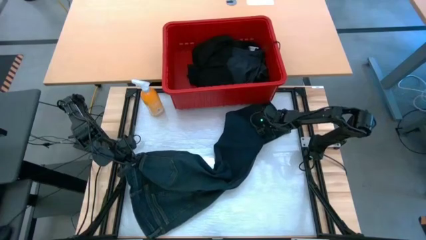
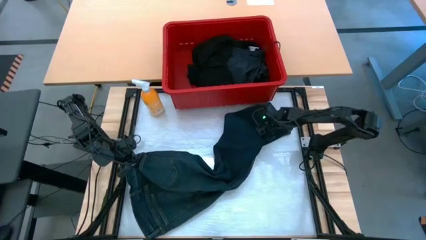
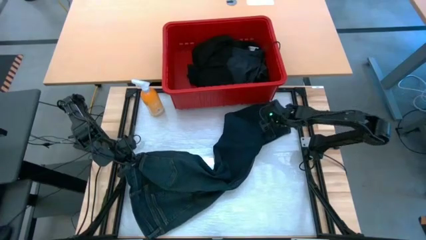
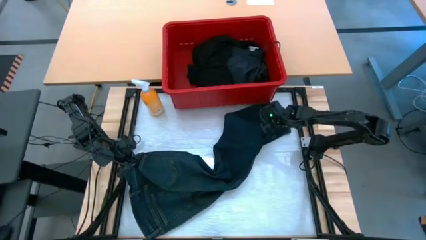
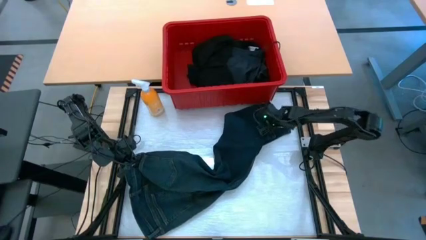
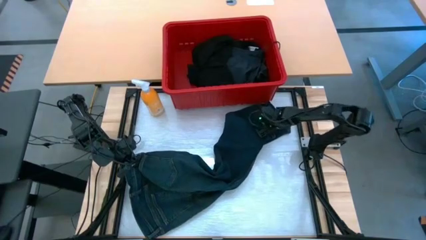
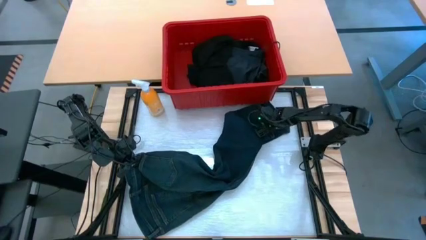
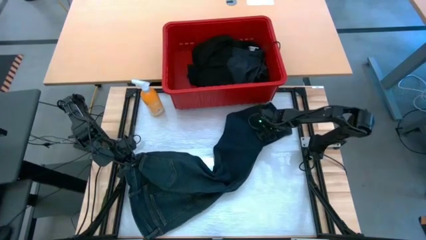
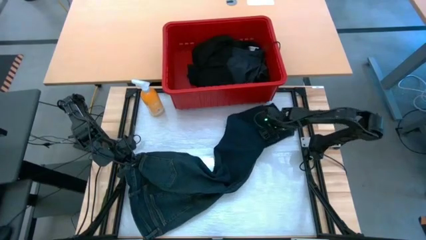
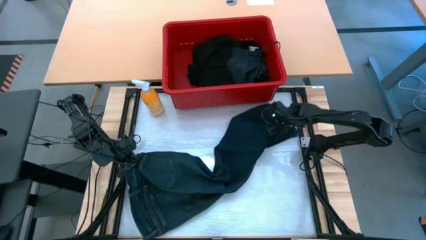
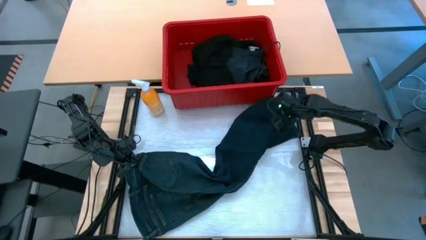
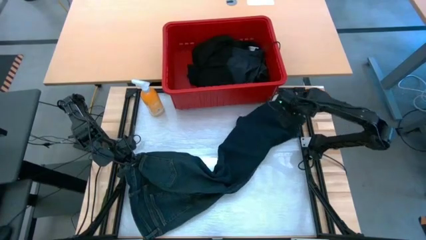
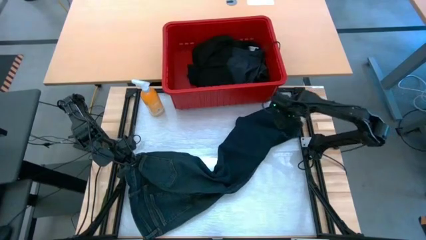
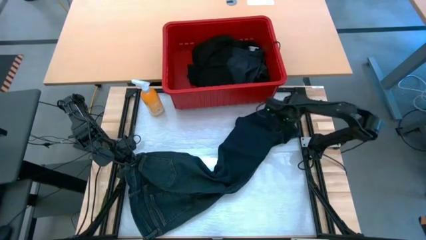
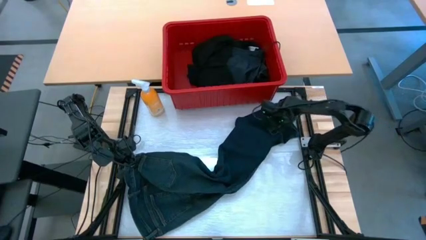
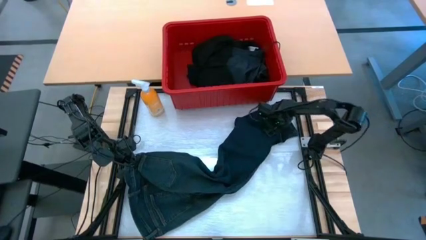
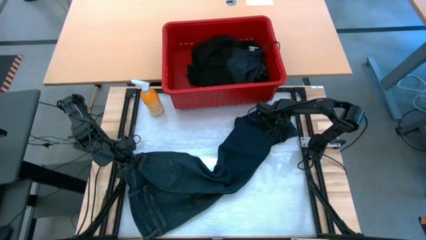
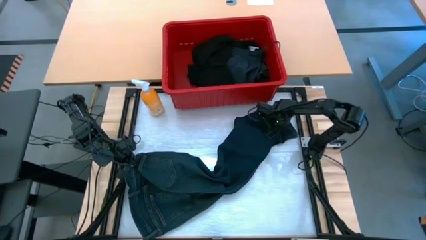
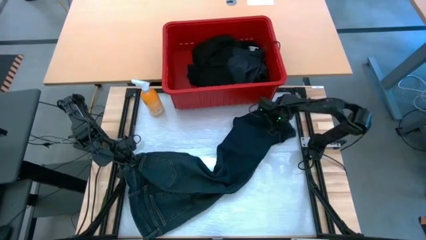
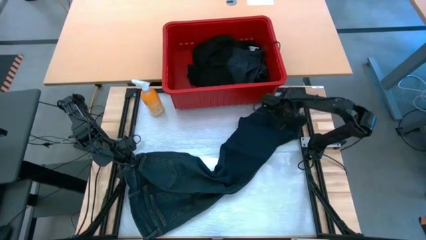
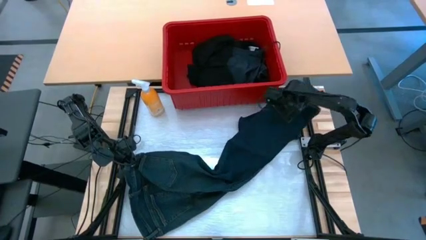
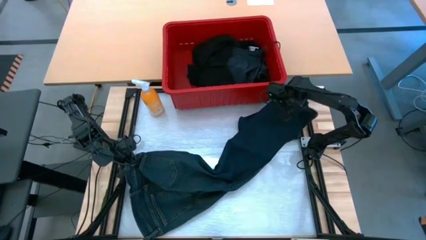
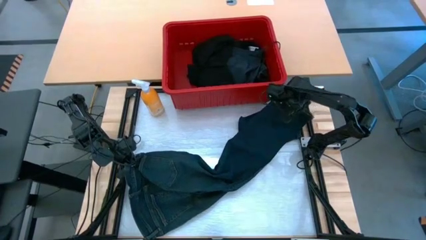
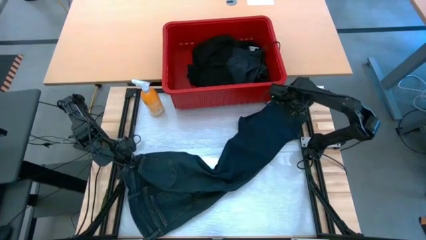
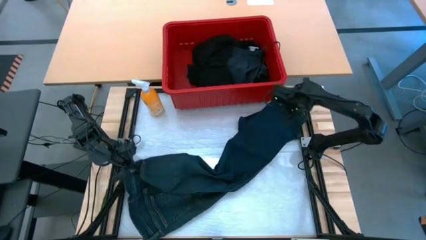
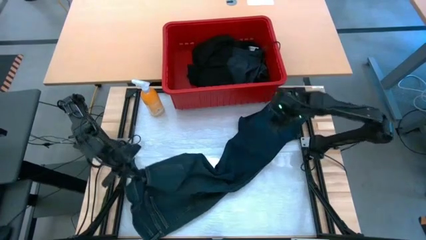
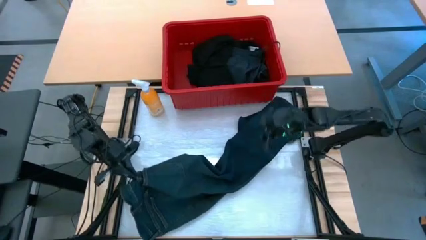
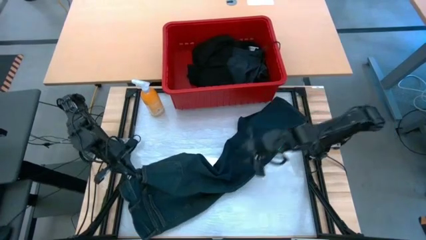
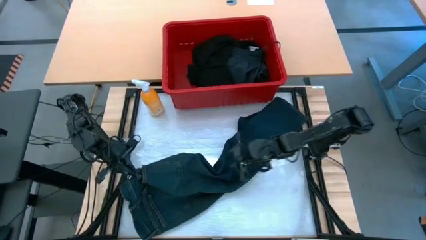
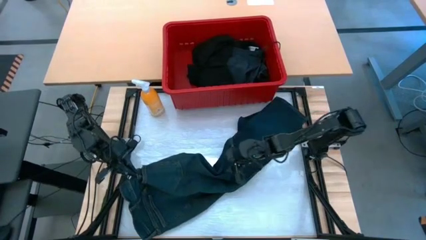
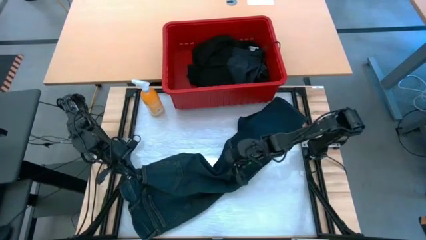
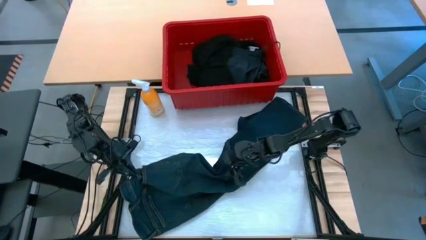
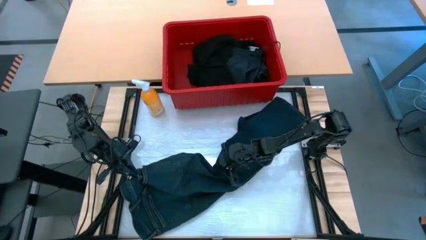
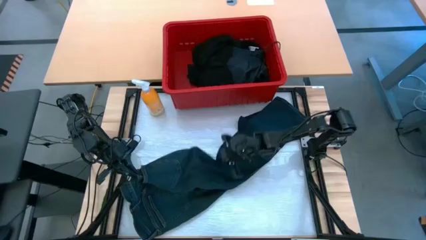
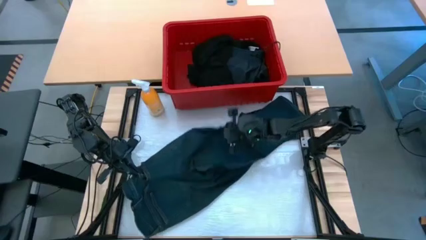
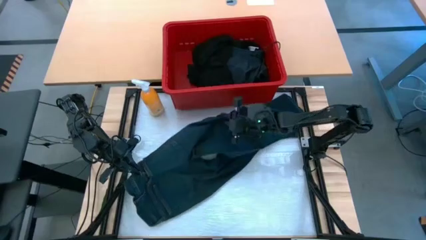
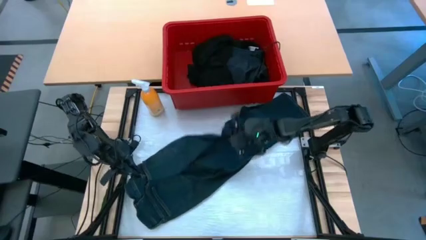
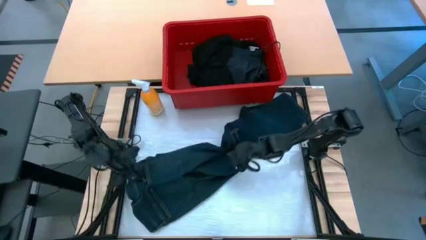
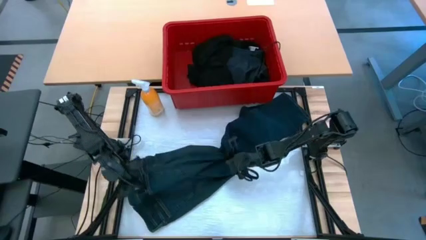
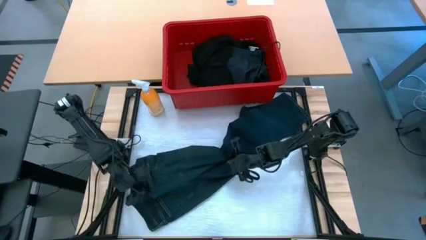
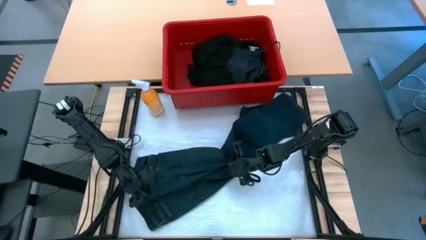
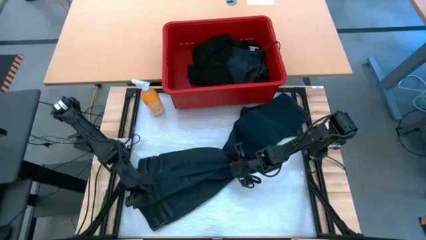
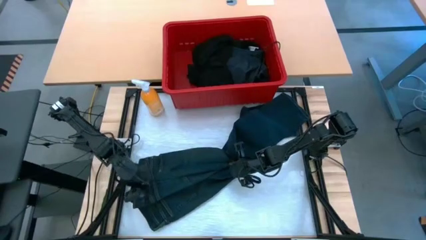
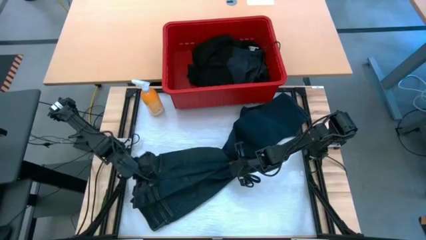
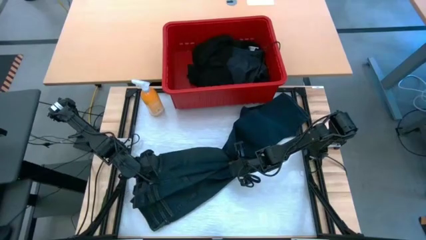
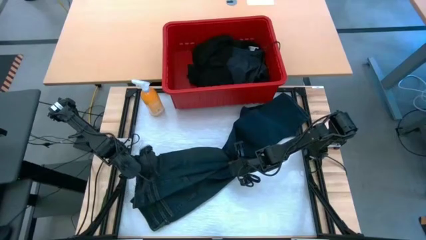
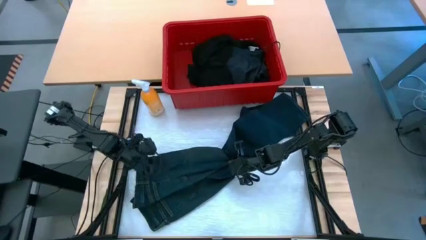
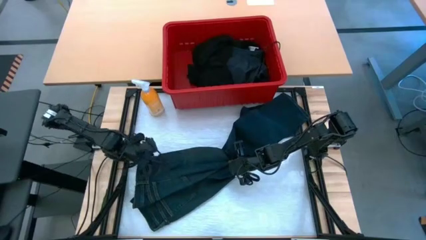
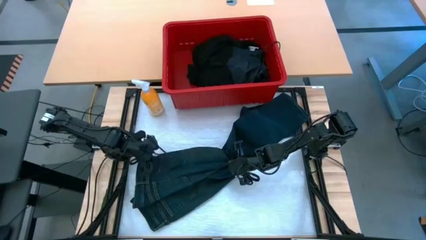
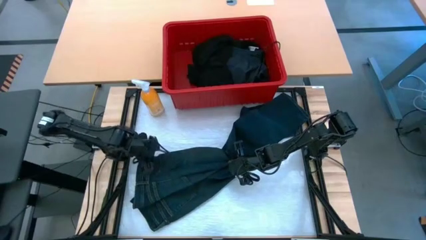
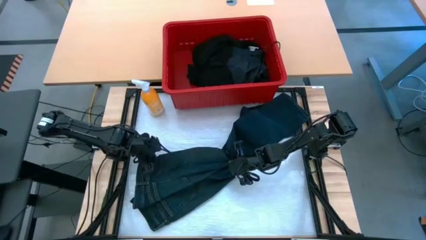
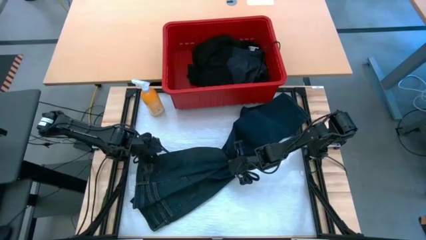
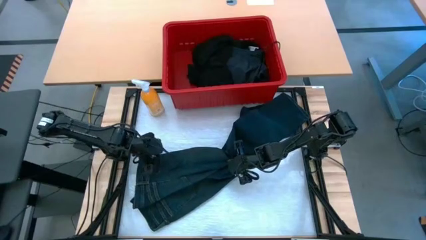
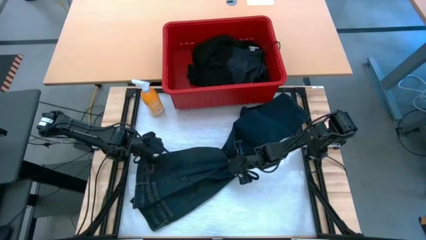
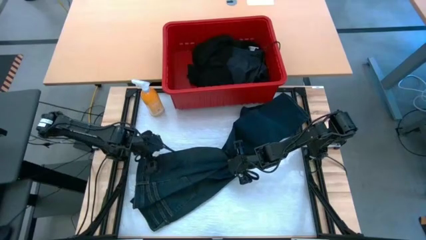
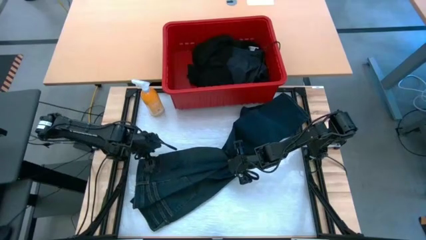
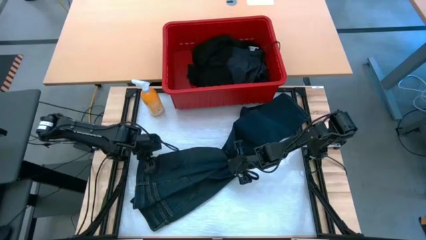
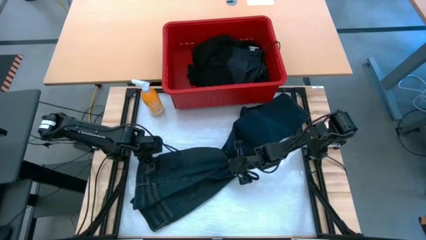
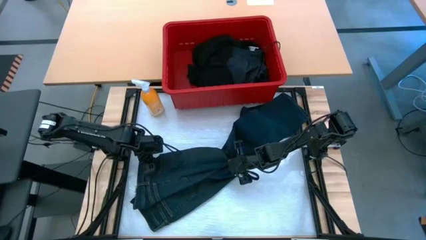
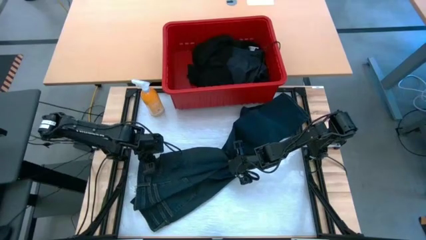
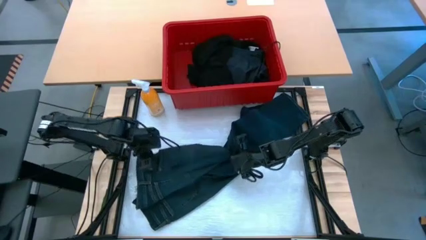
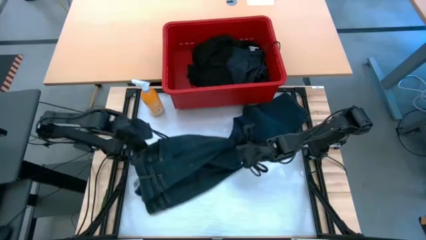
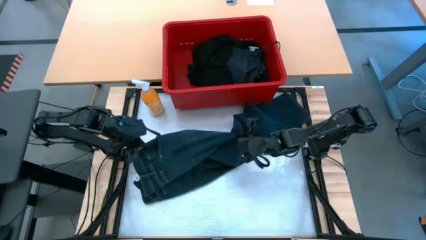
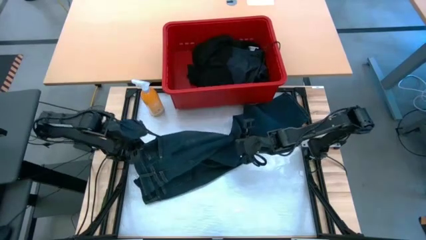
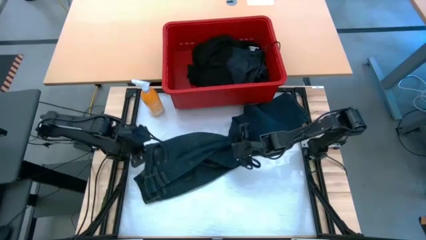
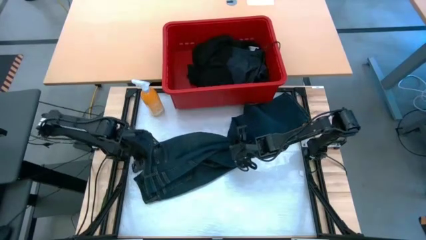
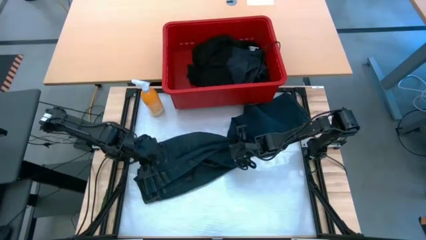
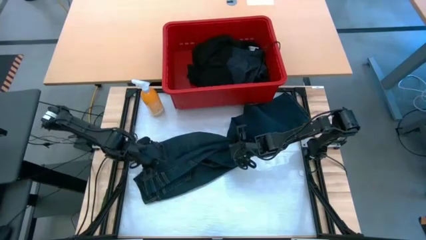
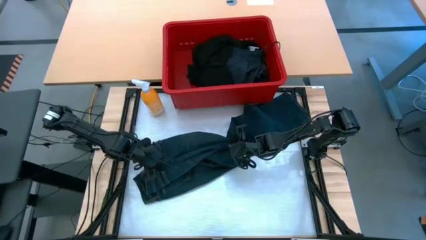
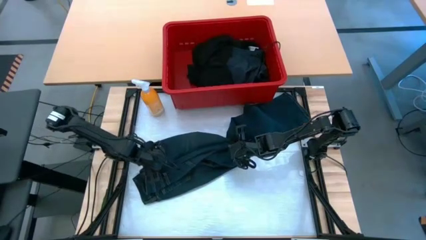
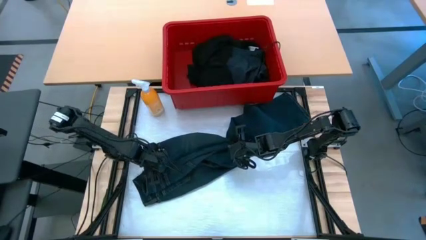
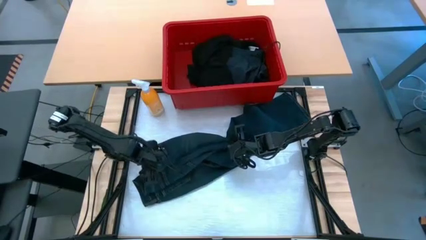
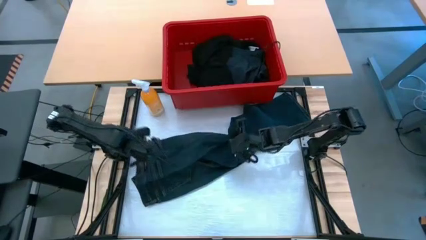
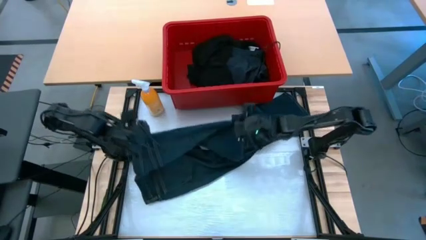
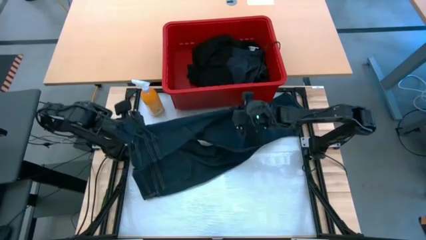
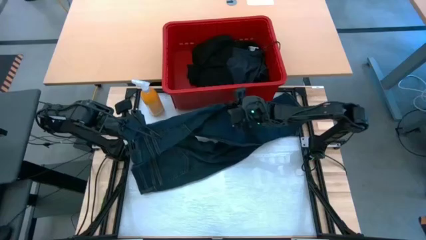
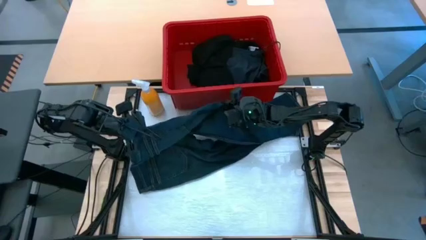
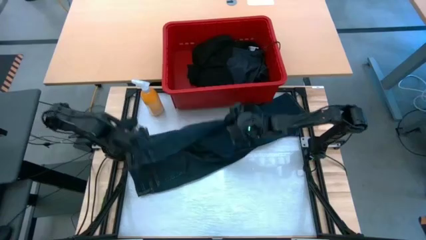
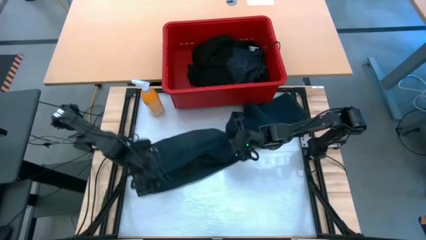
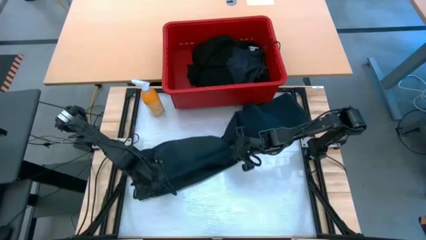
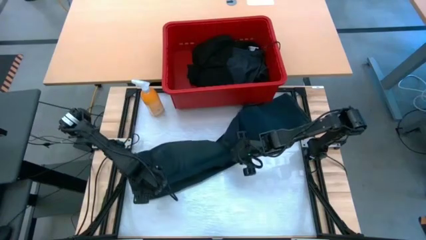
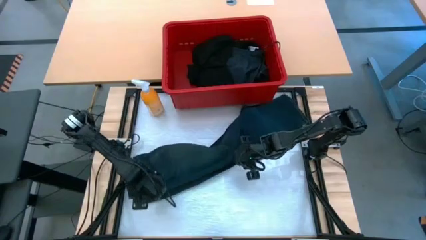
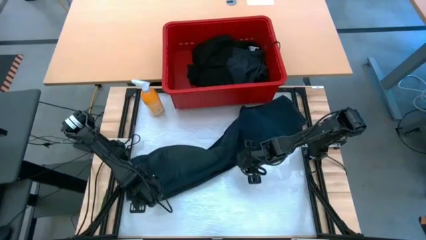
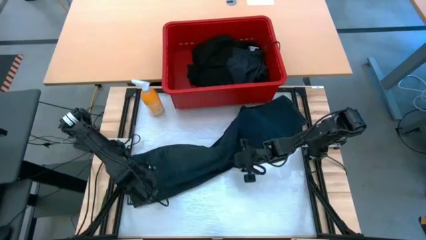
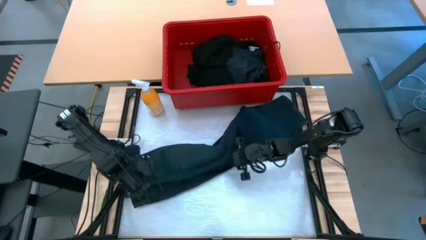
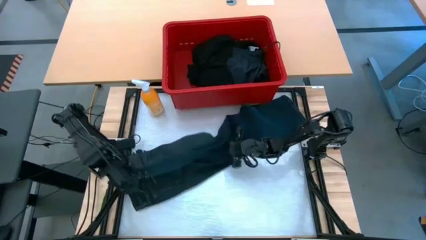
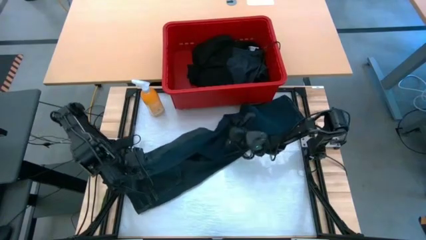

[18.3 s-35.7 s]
Task: Fold Laundry from Bin
Fold the dark blue pants
